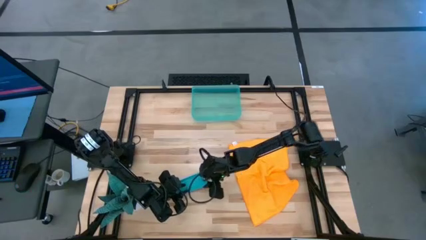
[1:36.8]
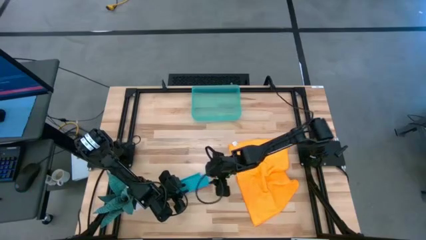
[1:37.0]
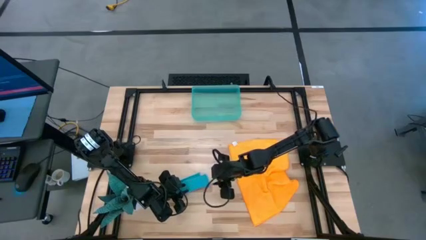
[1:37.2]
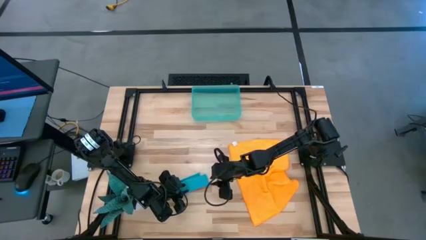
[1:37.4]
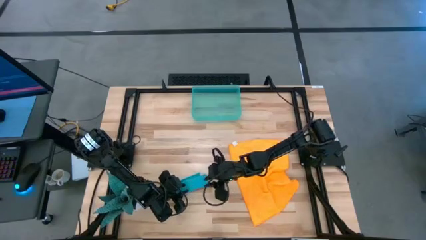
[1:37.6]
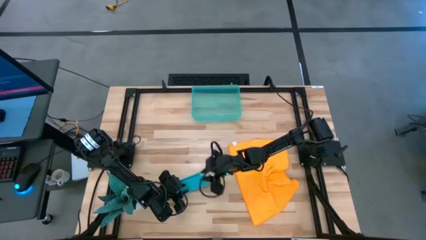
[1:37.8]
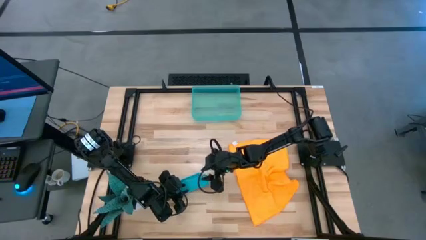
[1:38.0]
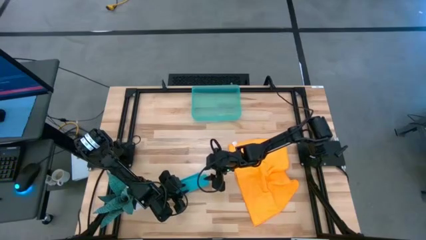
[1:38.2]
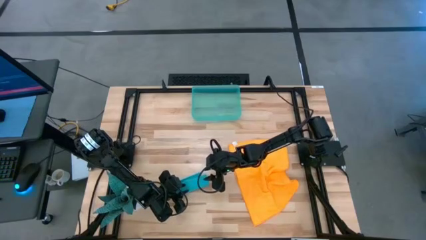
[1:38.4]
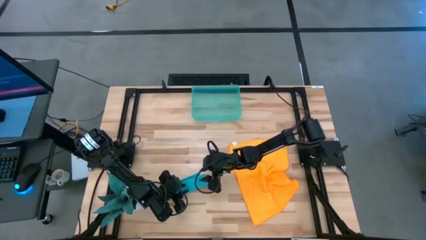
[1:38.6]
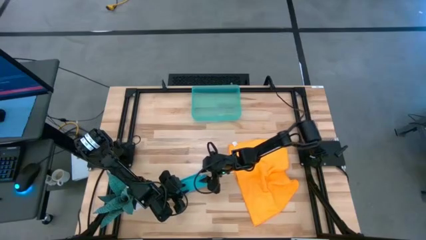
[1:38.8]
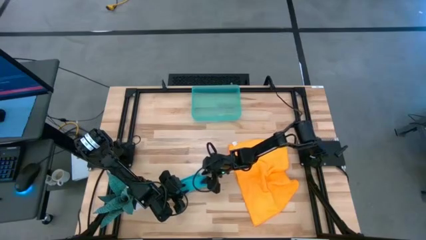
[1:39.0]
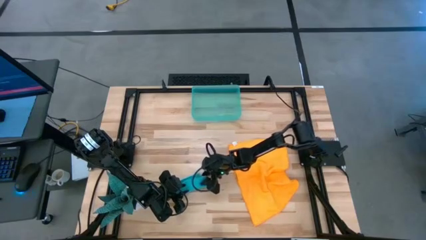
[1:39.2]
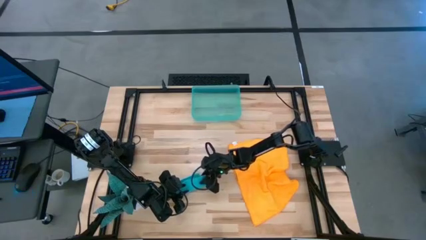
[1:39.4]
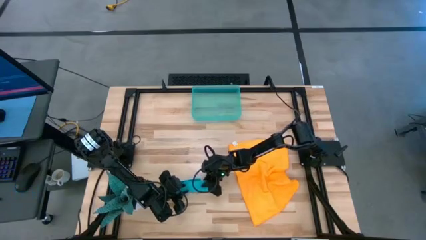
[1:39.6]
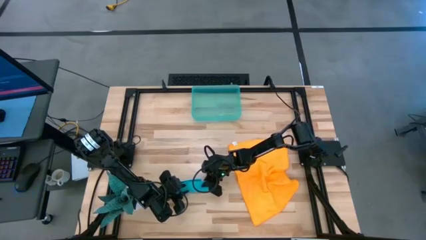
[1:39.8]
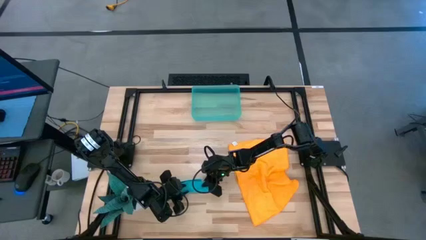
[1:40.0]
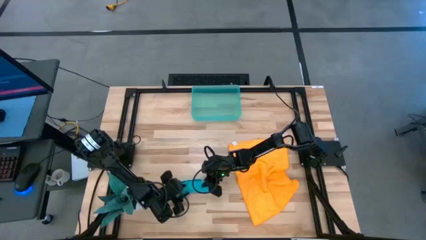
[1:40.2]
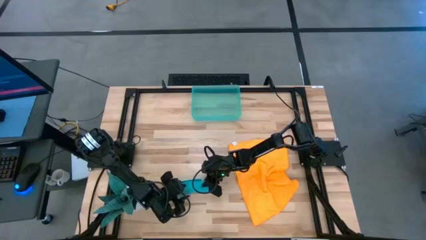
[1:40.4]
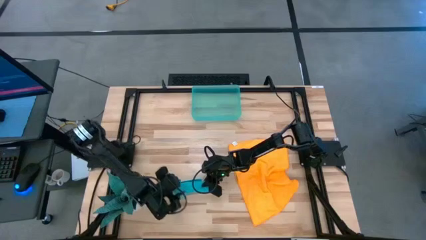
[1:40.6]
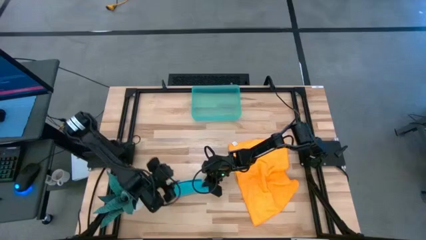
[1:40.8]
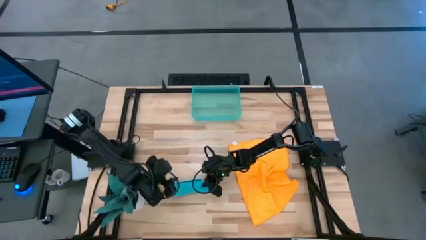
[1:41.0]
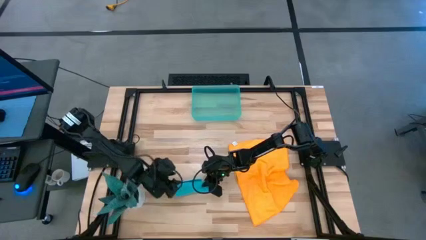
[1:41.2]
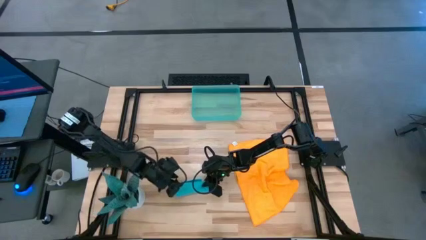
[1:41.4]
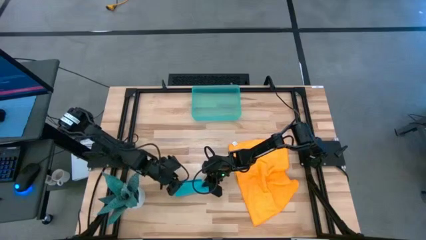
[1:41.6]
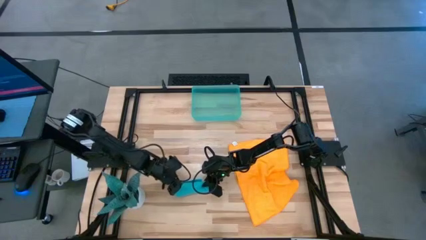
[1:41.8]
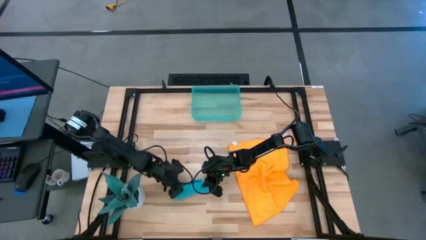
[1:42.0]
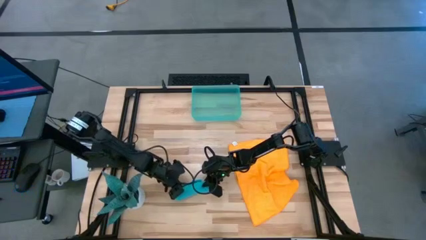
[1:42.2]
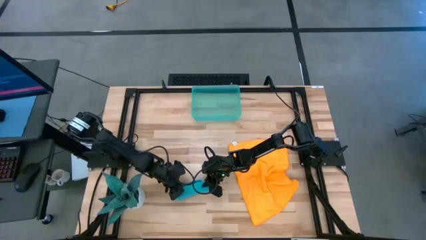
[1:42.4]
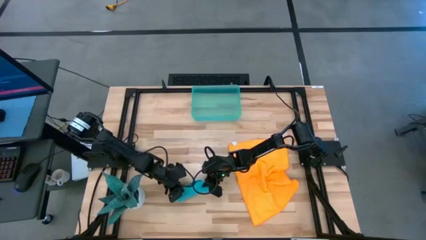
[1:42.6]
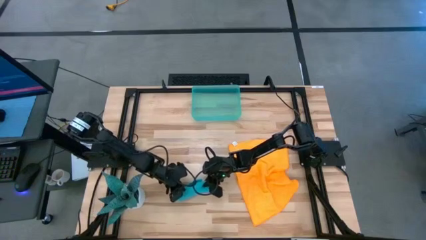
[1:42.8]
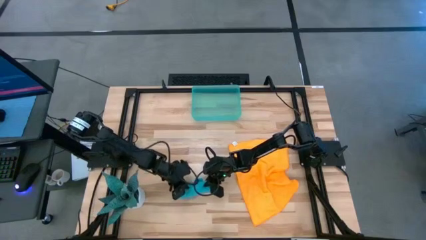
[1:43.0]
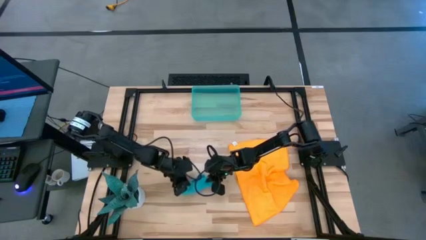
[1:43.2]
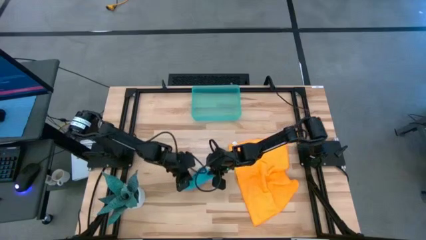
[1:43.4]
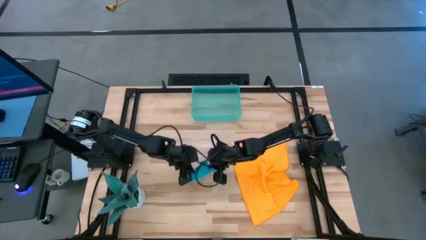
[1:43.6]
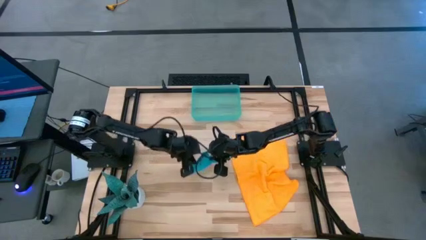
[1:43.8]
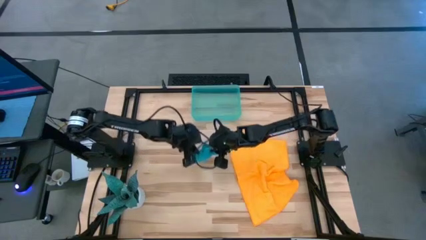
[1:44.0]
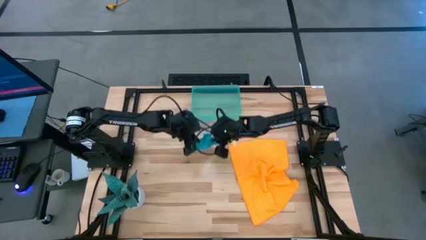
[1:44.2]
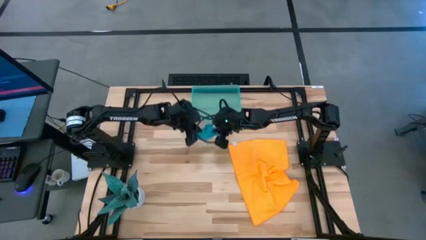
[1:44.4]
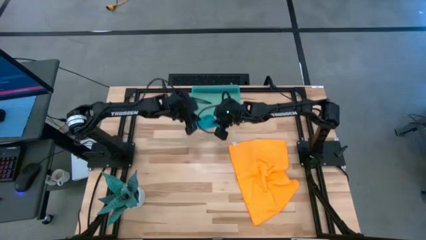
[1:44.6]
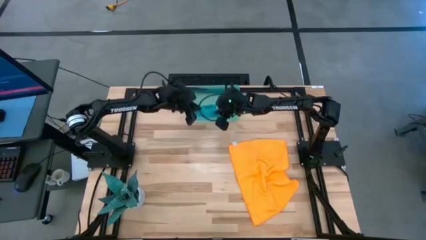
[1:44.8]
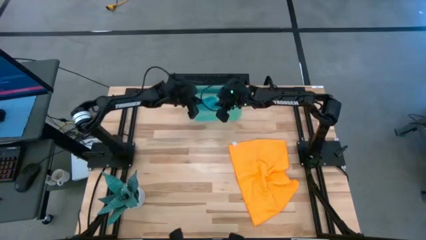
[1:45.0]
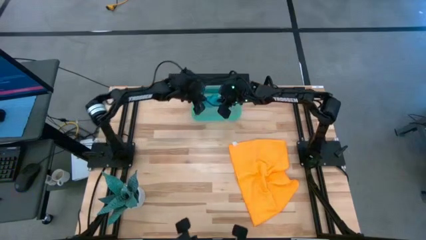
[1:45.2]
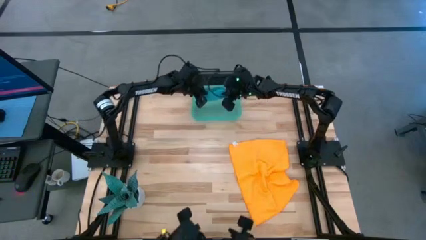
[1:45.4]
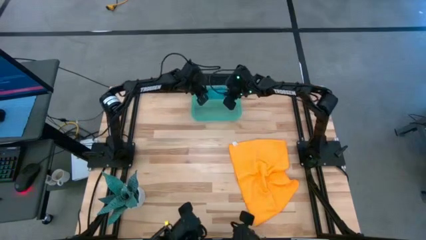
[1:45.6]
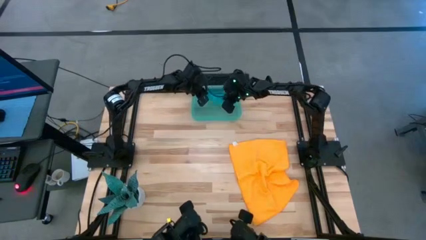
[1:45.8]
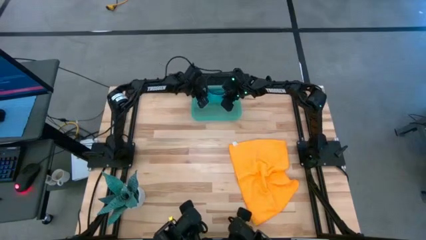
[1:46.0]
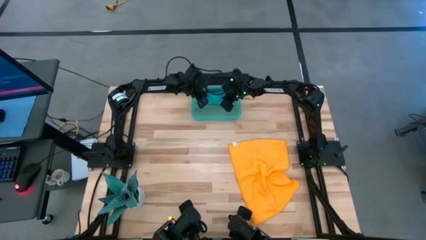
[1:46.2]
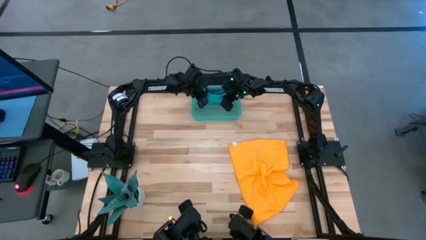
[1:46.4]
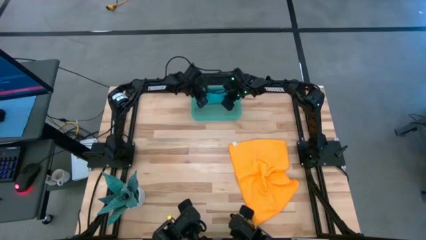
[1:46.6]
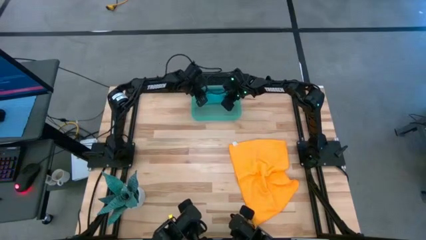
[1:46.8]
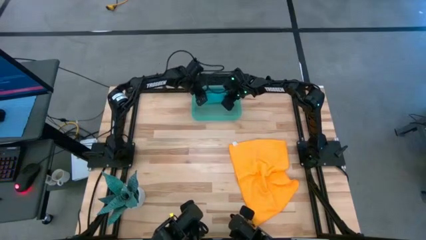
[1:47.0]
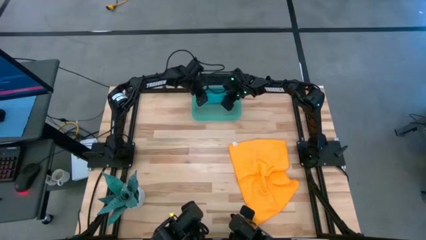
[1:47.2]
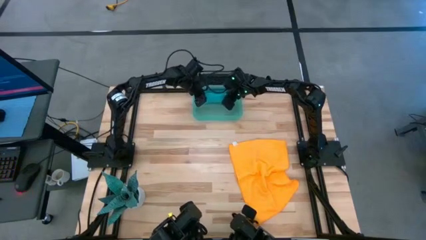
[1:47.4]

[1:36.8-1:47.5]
Task: Roll microfiber towels into tight, uniform cylinder then place into a basket
Put the rolled blue microfiber cloth into the blue bin

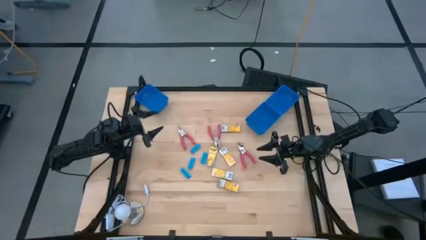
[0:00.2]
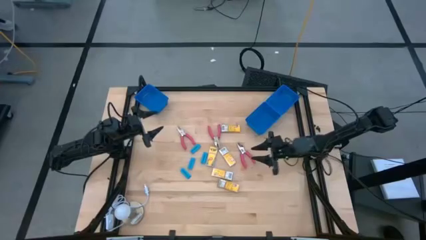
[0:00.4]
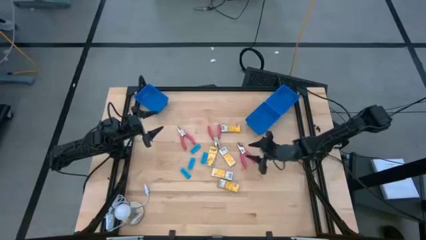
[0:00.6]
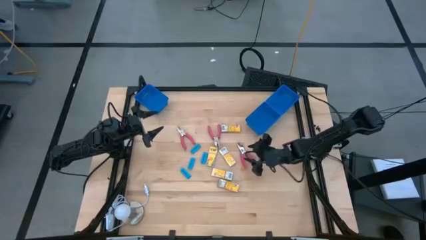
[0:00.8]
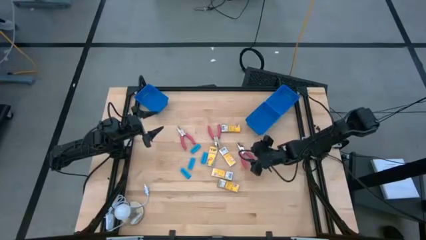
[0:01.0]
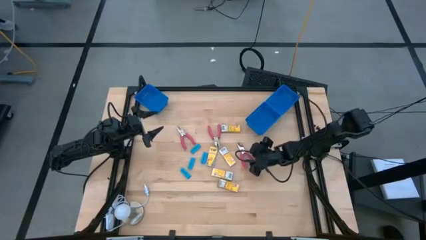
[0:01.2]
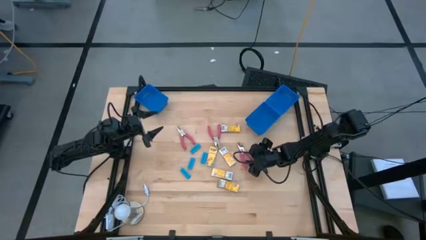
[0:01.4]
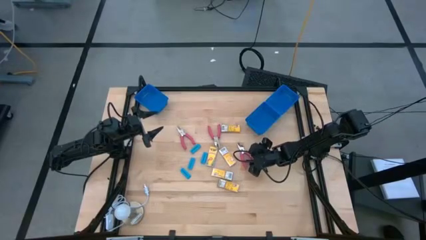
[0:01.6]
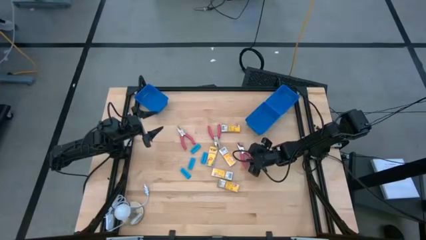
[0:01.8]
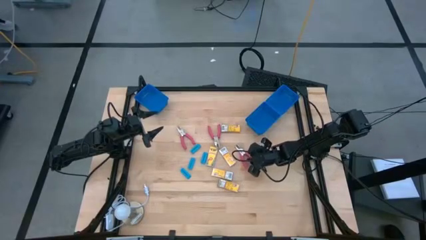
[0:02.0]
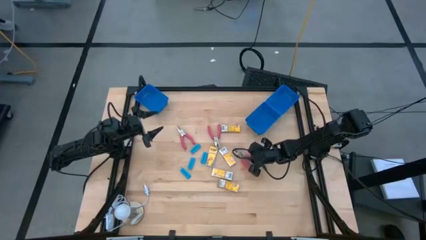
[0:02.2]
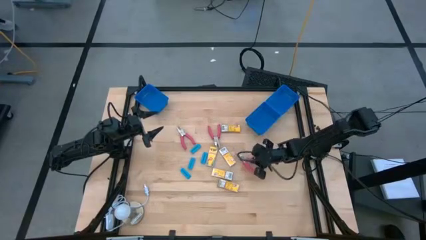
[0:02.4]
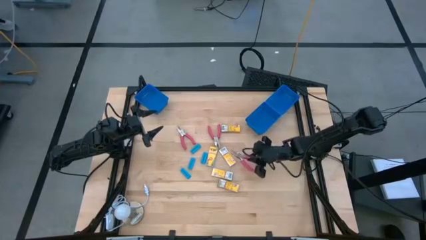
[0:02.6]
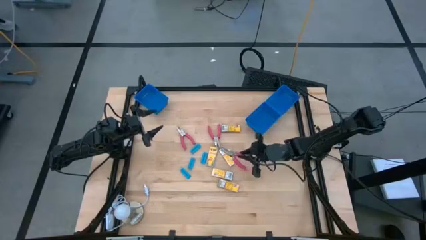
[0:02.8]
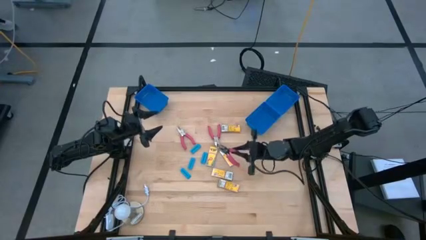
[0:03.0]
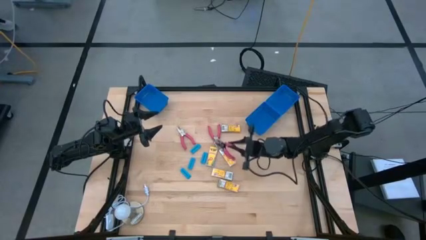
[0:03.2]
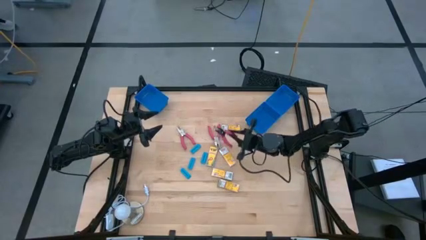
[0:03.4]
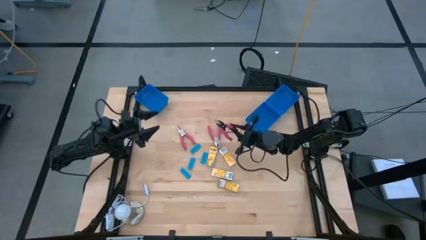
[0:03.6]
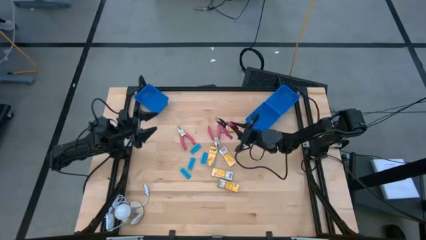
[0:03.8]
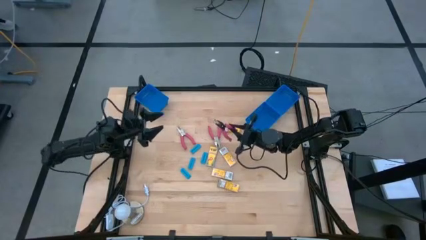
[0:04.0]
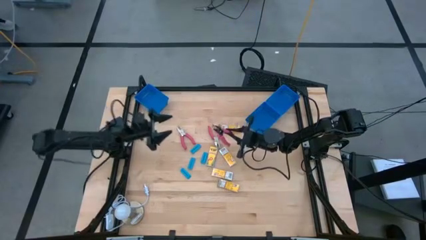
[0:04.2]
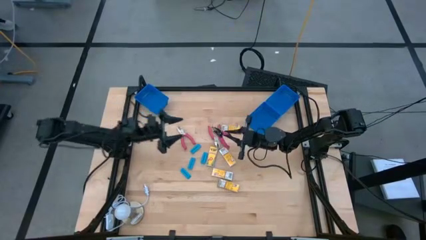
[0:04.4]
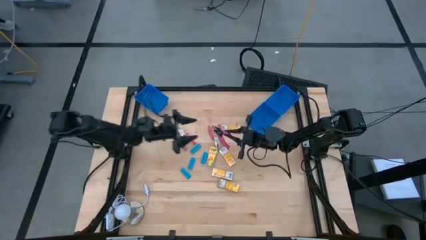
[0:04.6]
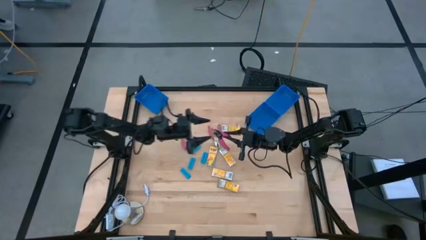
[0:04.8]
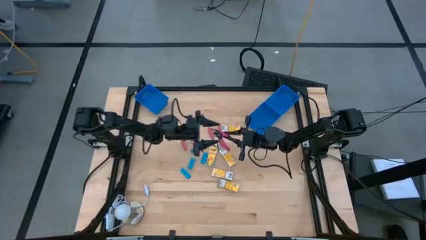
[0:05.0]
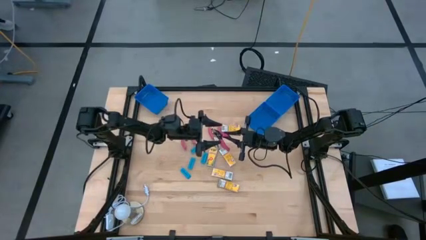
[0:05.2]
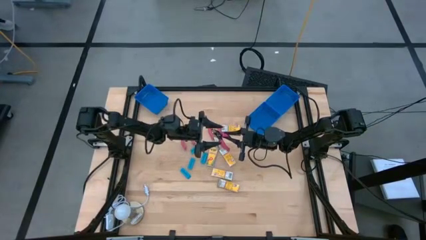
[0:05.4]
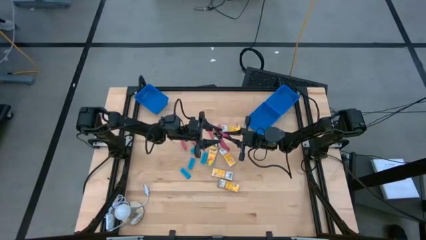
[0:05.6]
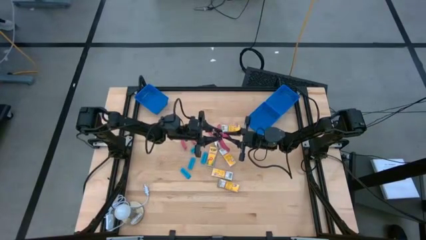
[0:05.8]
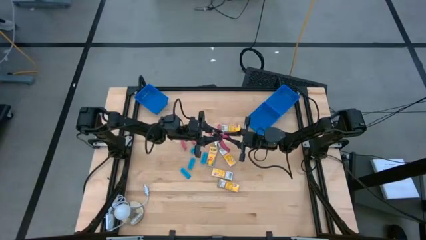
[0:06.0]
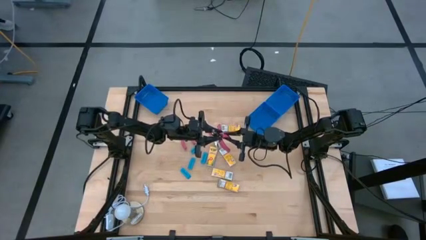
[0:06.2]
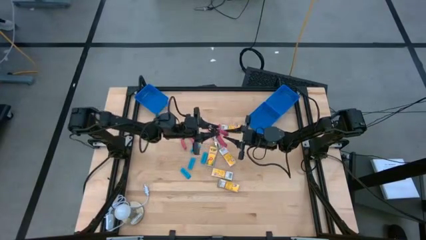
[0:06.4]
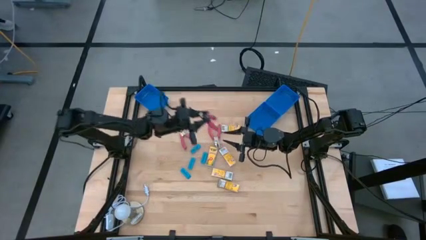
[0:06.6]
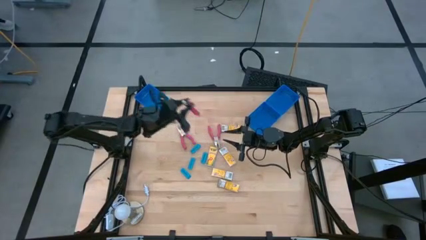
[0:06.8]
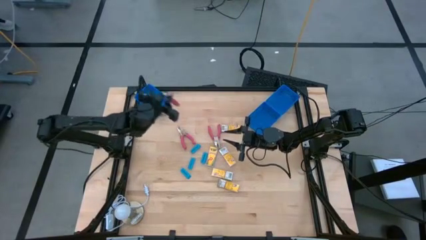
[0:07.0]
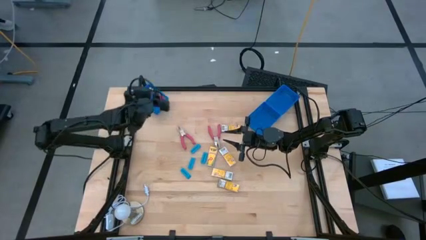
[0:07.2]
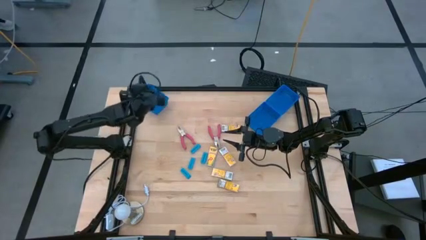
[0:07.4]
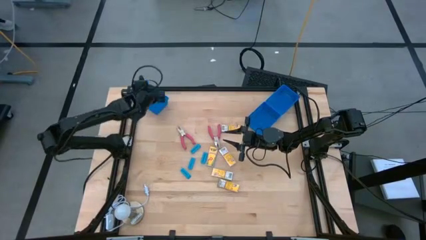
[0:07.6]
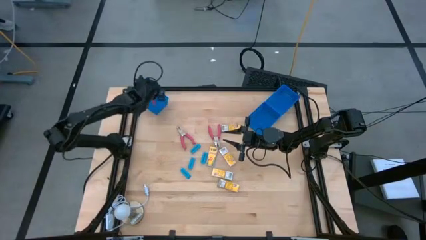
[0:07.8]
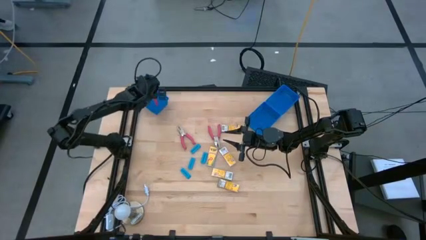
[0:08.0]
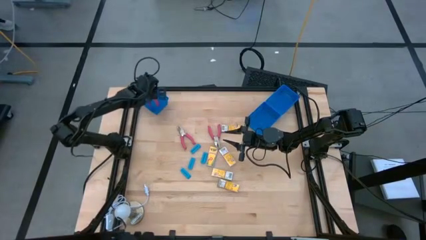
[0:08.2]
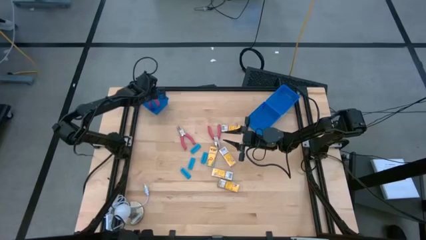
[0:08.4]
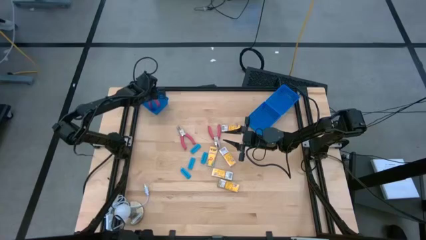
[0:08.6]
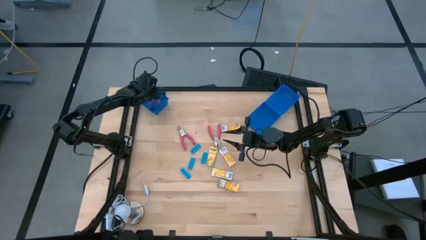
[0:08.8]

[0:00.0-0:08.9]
Task: Pick & Place School Supplies
Put the pink puncher into the top left blue basket
